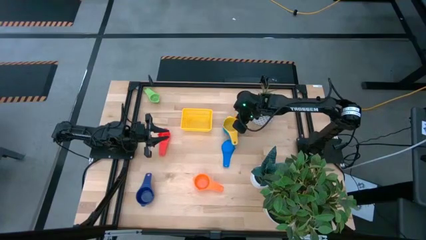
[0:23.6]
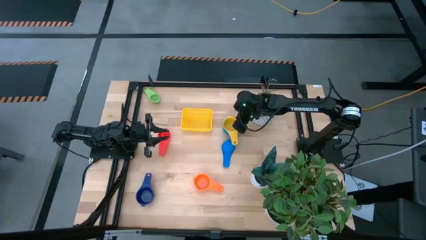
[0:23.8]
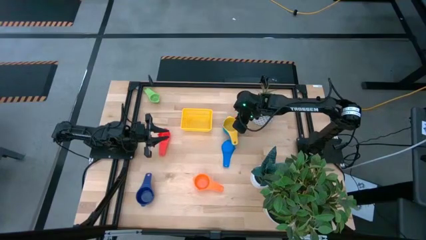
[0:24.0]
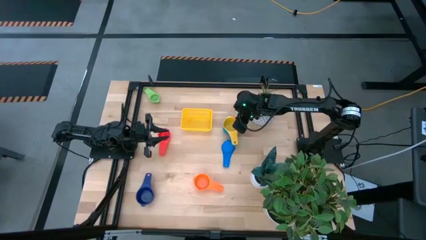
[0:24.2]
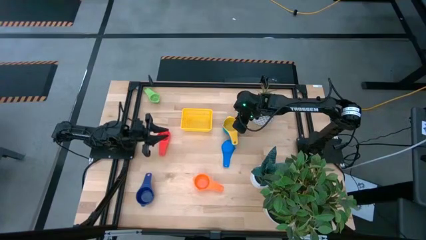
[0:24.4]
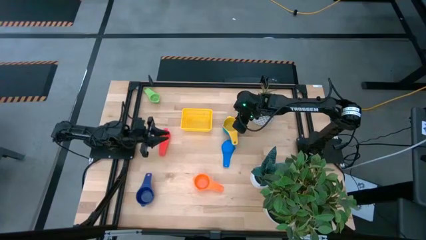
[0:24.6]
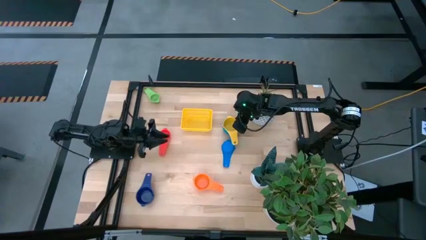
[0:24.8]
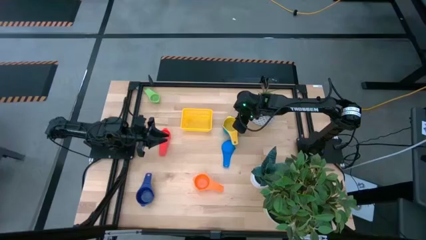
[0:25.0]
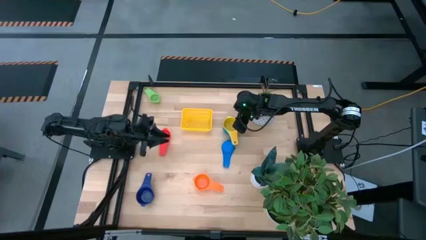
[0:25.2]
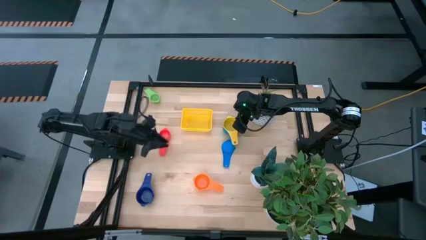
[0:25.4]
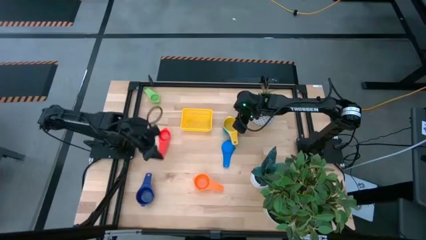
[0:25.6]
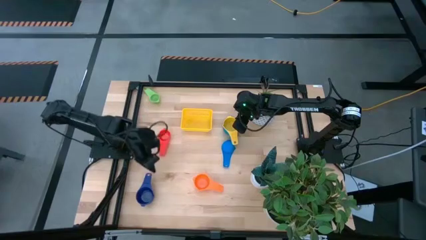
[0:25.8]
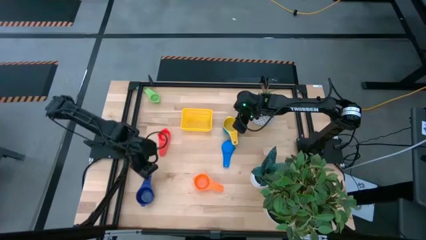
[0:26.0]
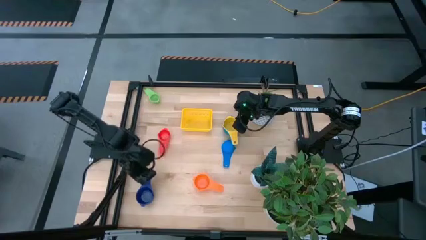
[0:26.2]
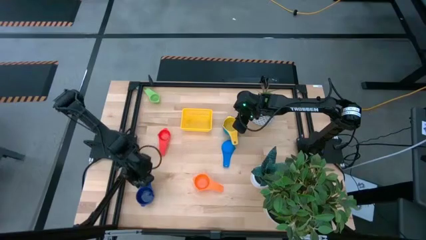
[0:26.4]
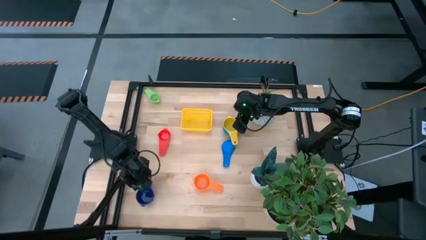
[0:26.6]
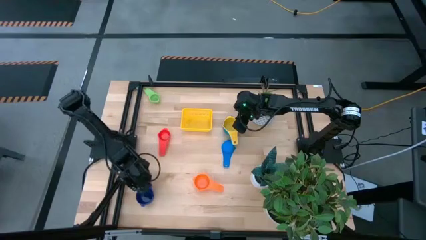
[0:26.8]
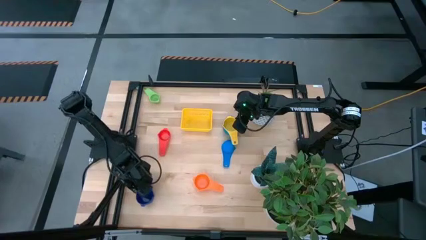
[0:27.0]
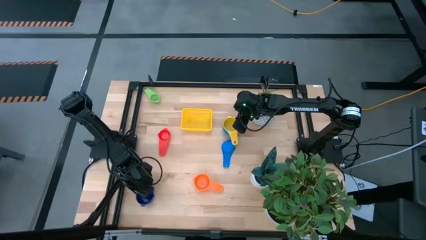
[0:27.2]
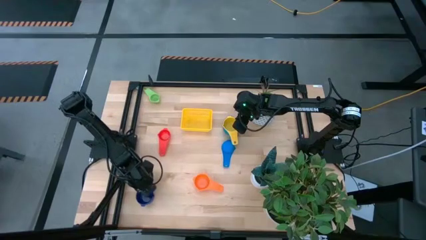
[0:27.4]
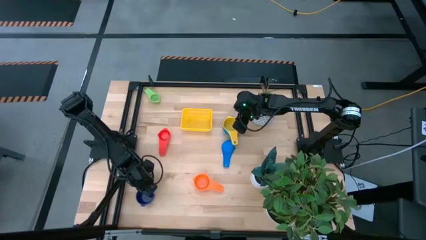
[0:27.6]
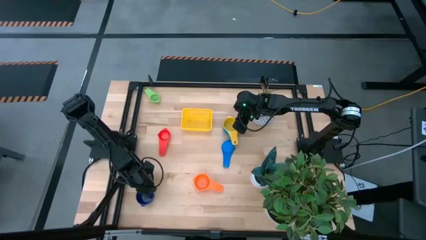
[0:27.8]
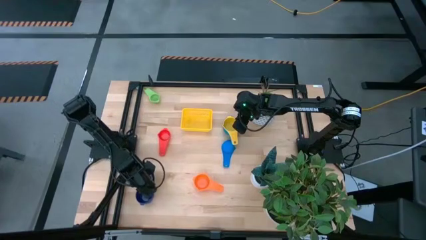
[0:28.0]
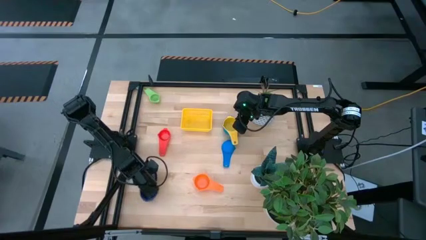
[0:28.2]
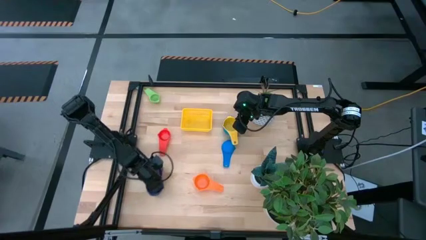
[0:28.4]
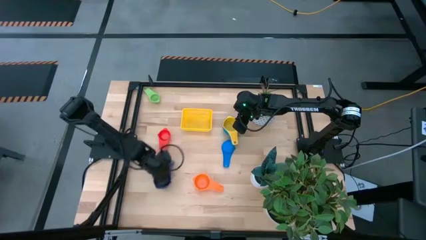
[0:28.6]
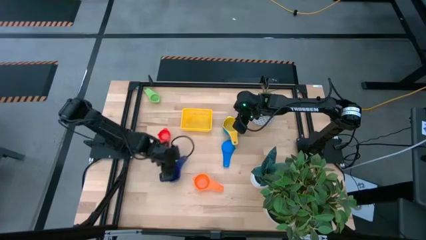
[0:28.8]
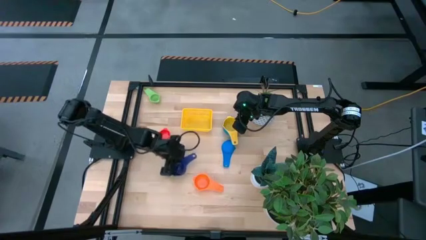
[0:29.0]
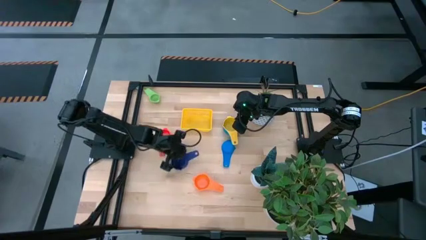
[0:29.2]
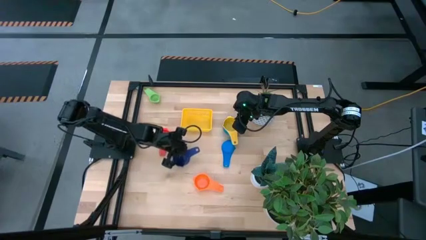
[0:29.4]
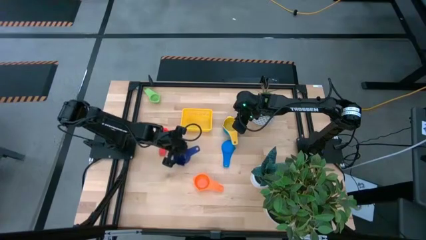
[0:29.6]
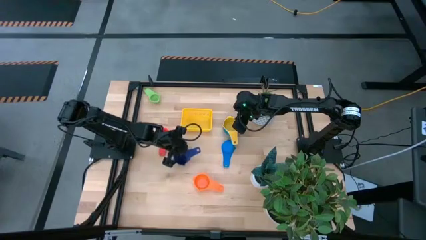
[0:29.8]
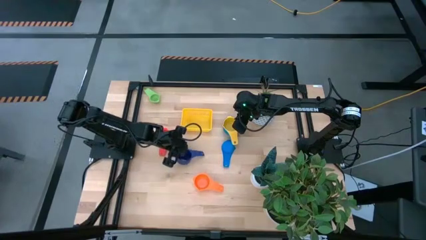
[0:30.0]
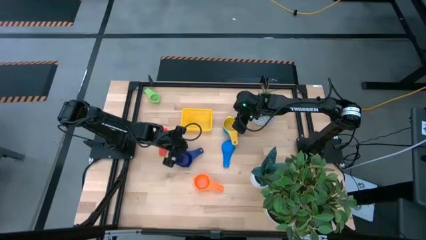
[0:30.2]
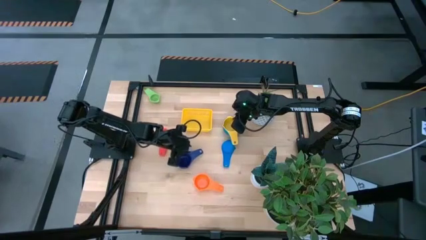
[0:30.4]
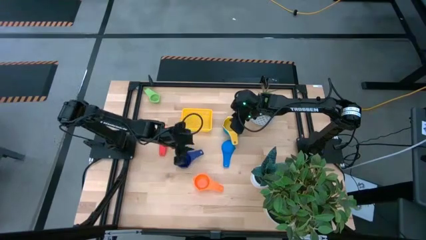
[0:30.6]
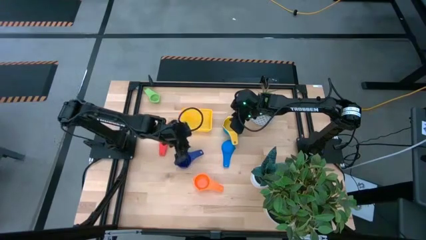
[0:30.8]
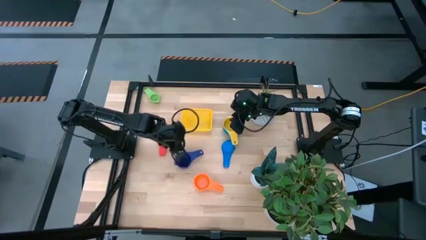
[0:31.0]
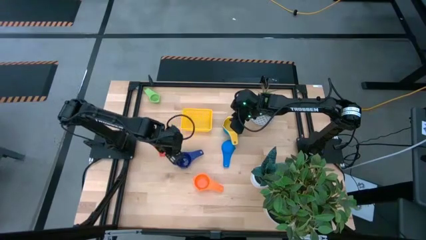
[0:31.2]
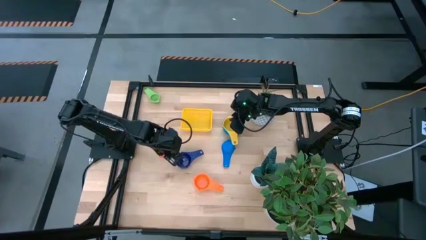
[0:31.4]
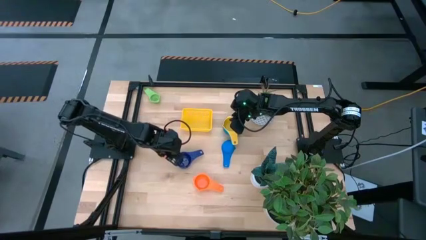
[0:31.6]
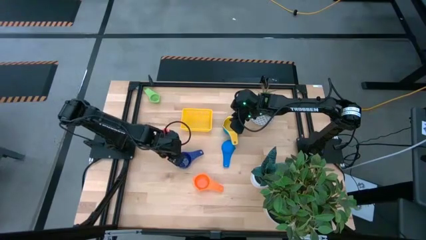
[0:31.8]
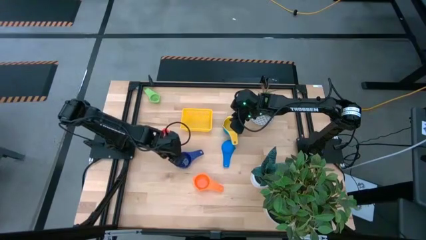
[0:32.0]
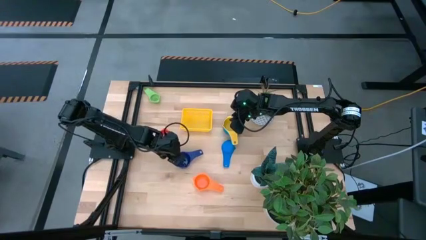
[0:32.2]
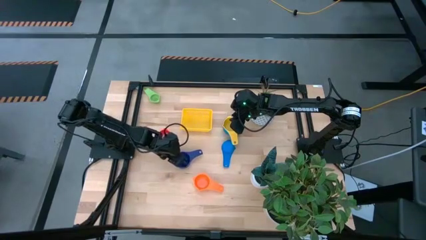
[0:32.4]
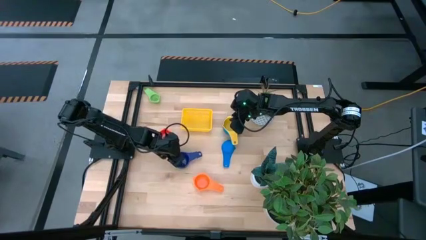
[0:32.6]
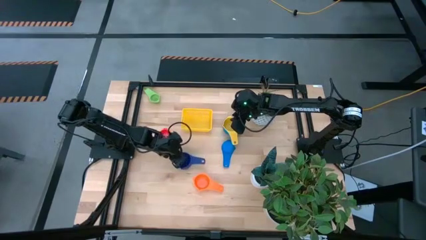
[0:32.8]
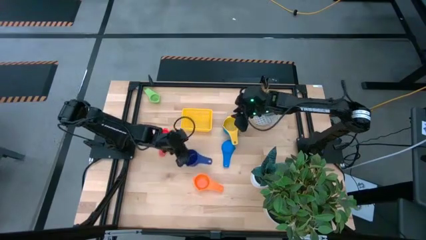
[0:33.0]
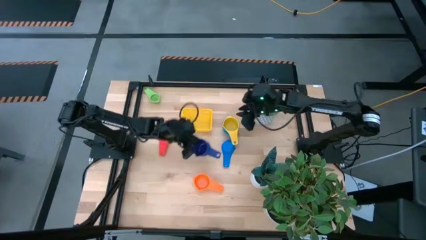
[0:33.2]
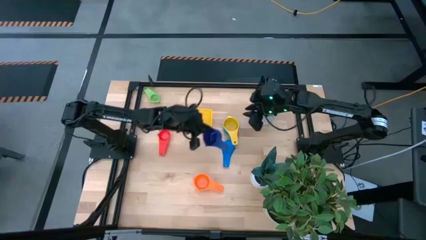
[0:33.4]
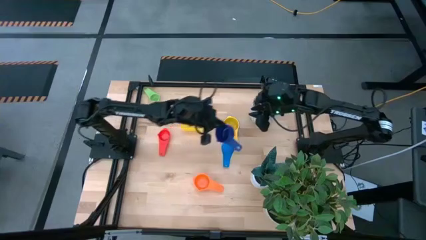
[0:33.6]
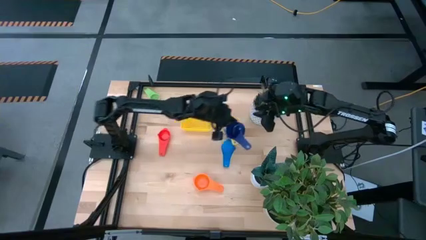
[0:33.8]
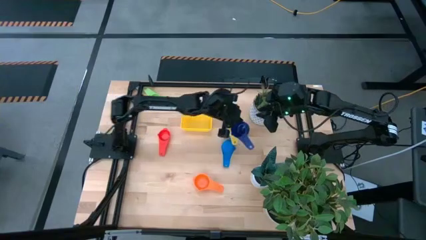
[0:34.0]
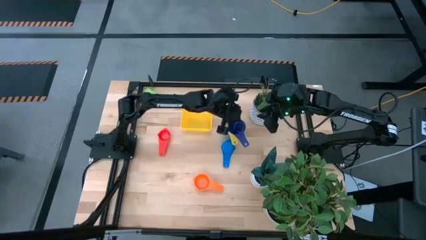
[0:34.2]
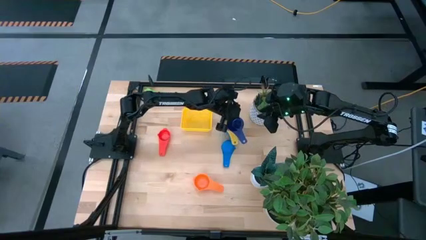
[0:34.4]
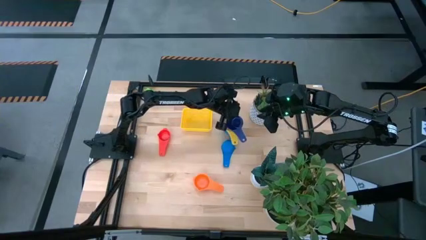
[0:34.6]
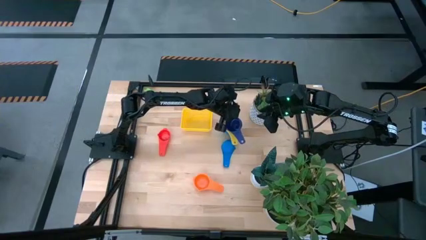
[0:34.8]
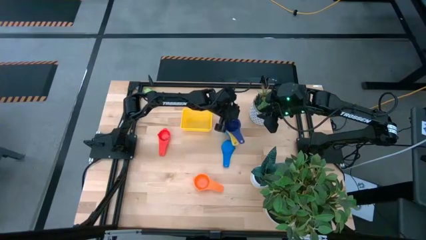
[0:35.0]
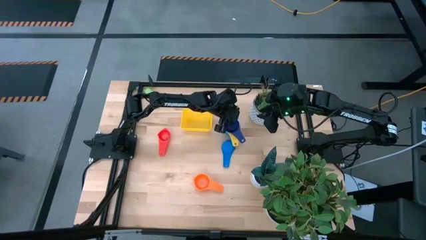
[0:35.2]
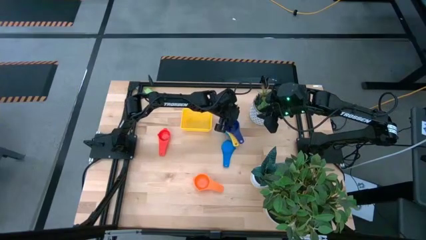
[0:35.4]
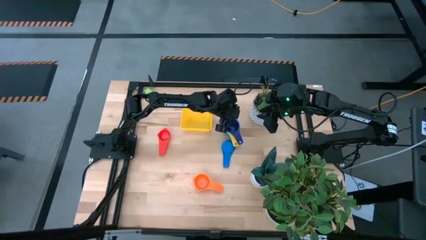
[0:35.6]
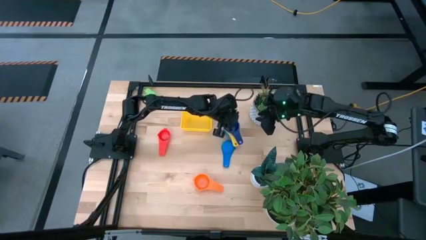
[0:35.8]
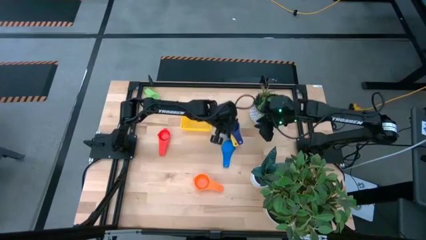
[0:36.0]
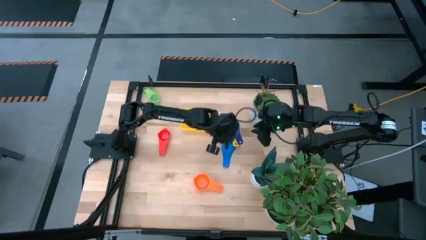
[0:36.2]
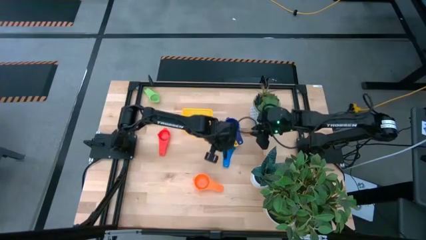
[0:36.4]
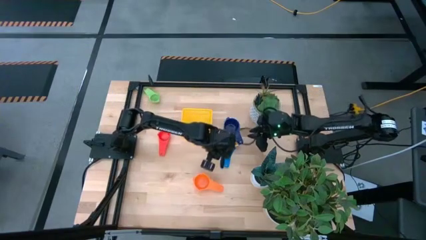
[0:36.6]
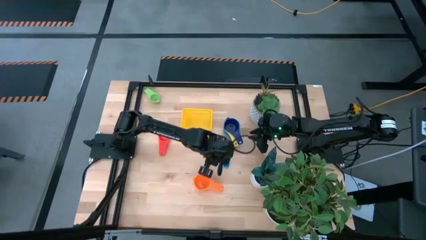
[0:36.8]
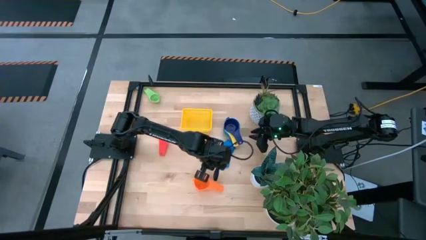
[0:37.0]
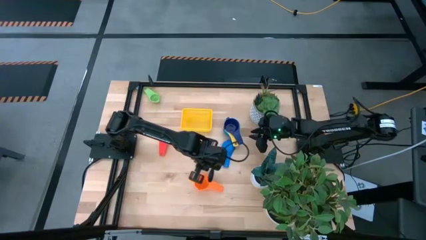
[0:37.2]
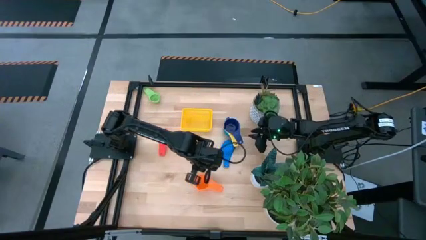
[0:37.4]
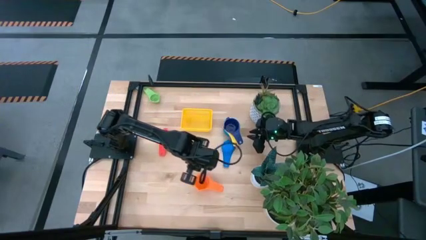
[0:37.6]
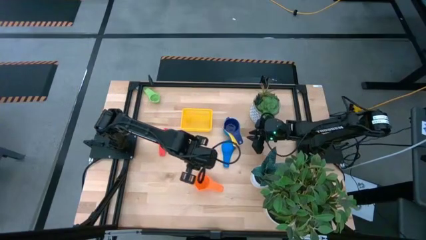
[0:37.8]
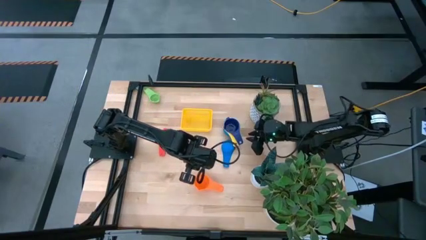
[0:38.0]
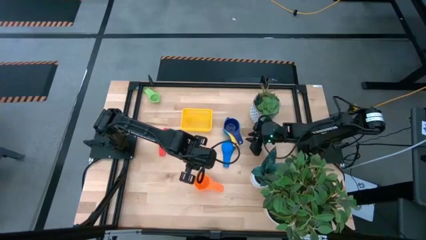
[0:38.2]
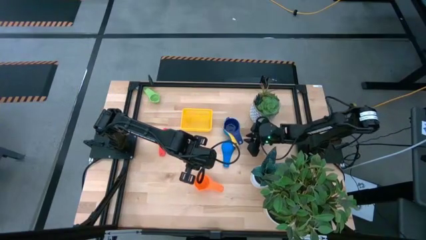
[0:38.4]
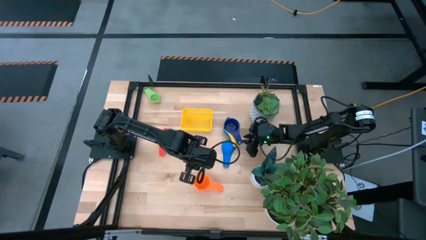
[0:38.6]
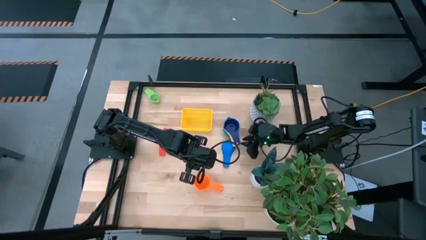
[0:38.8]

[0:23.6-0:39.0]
Task: Nest measuring cups in basket
Stack the dark blue measuring cup into the yellow measuring cup
